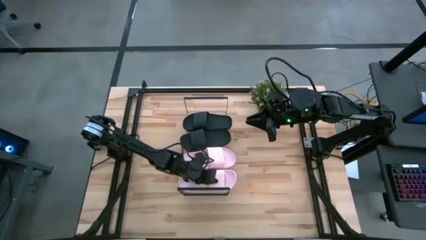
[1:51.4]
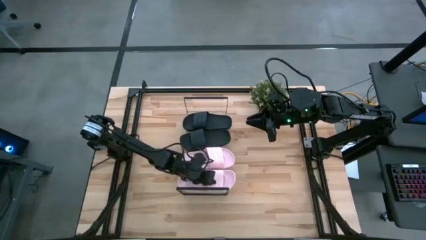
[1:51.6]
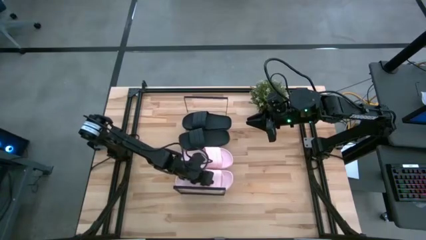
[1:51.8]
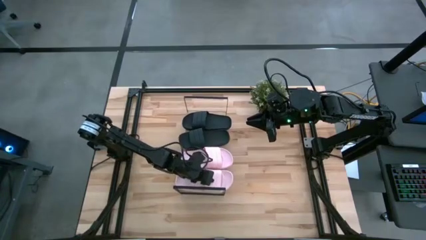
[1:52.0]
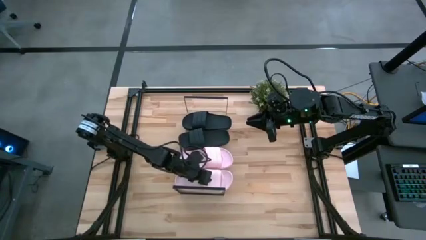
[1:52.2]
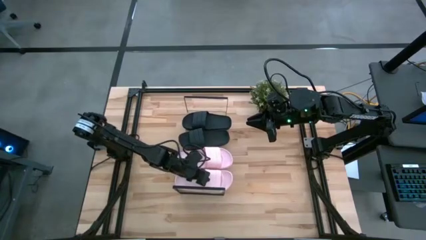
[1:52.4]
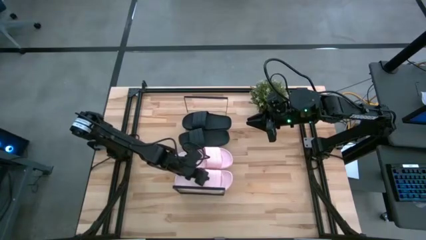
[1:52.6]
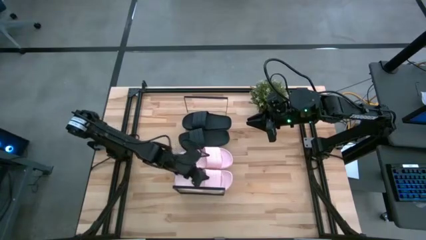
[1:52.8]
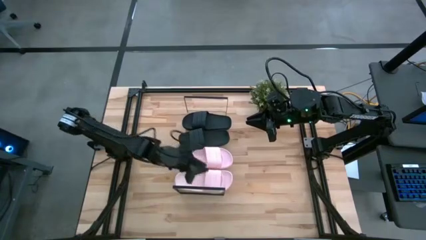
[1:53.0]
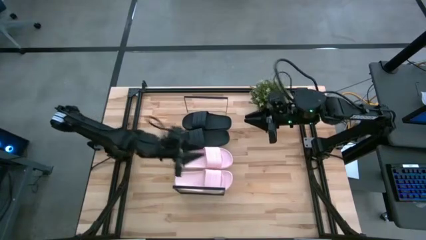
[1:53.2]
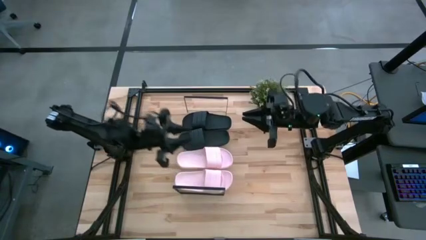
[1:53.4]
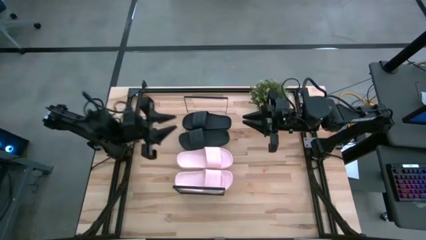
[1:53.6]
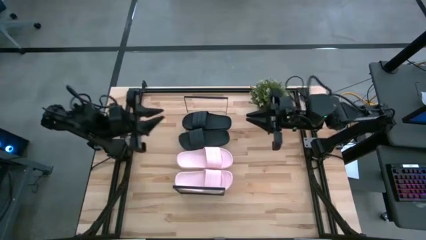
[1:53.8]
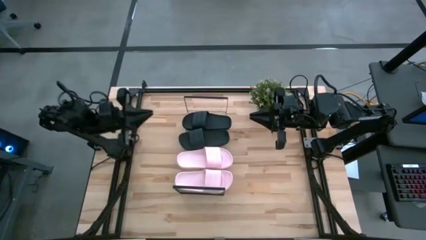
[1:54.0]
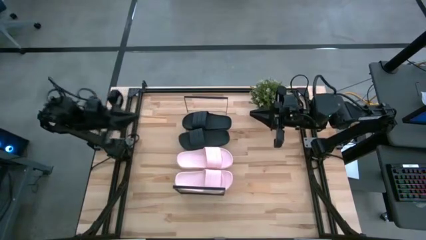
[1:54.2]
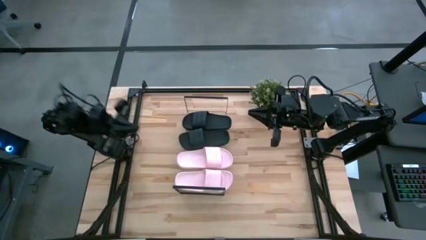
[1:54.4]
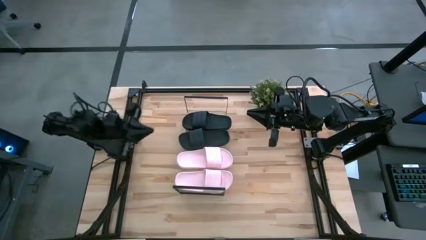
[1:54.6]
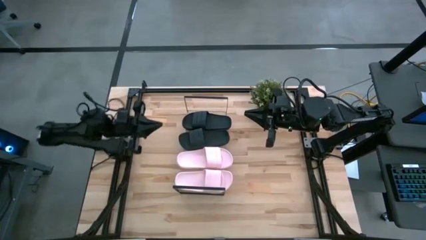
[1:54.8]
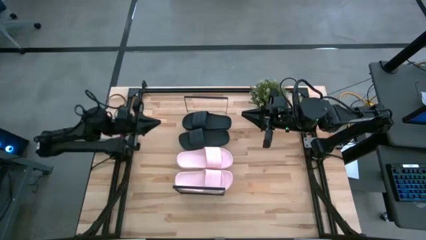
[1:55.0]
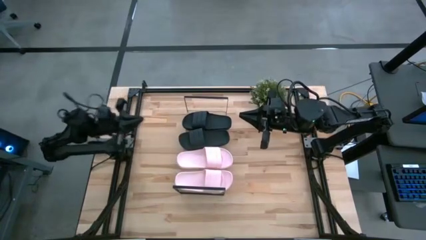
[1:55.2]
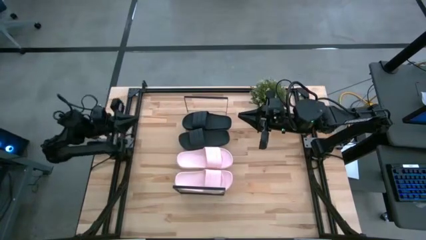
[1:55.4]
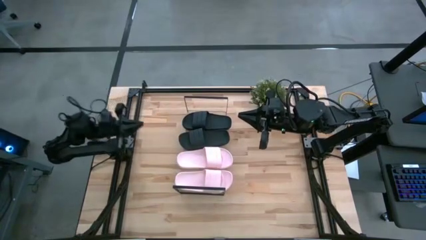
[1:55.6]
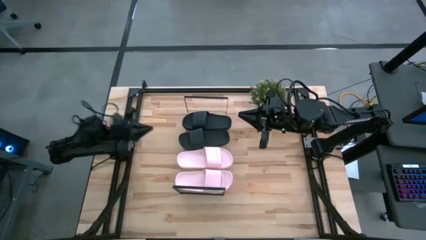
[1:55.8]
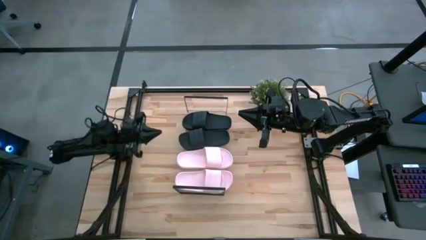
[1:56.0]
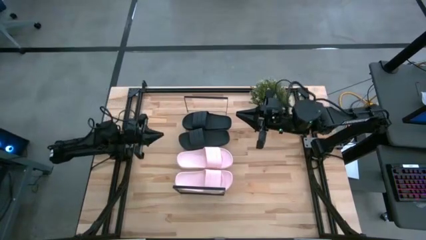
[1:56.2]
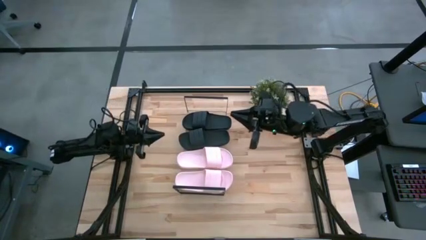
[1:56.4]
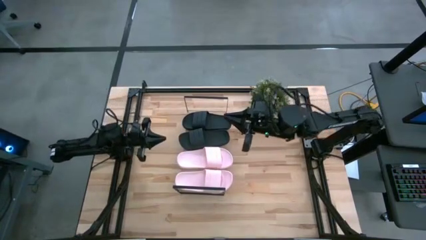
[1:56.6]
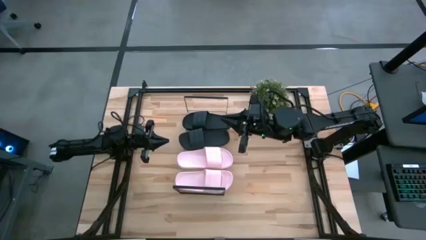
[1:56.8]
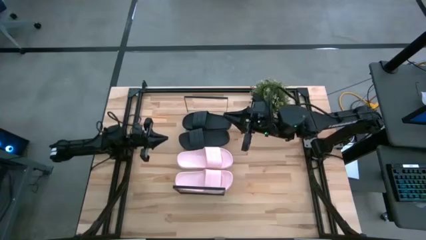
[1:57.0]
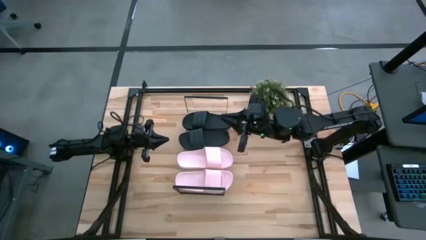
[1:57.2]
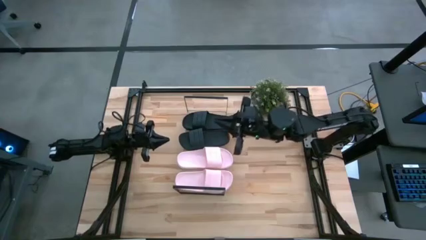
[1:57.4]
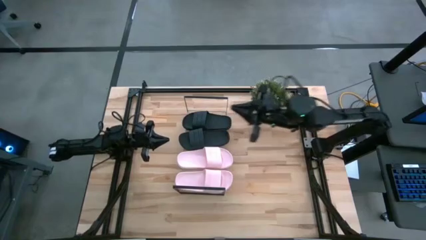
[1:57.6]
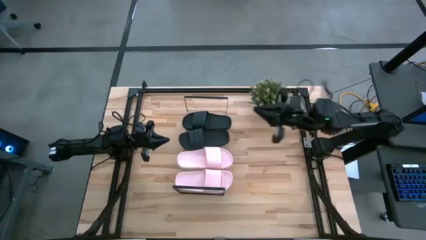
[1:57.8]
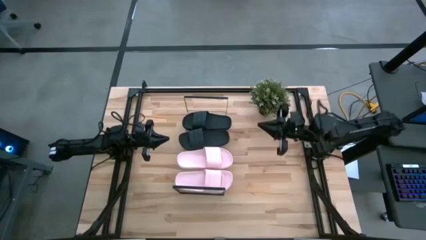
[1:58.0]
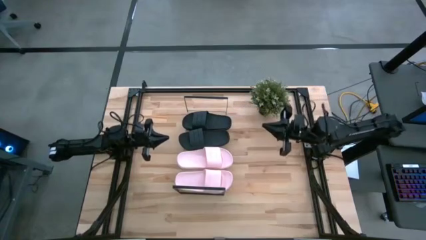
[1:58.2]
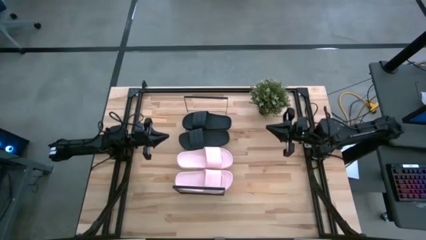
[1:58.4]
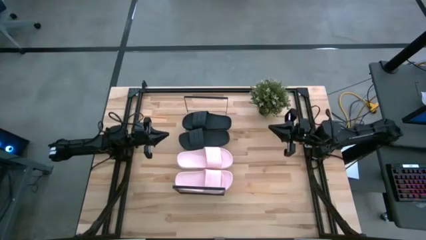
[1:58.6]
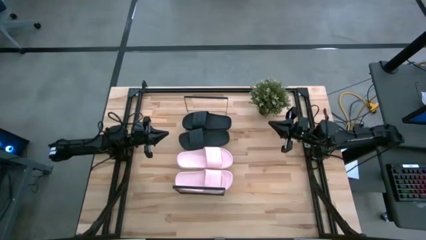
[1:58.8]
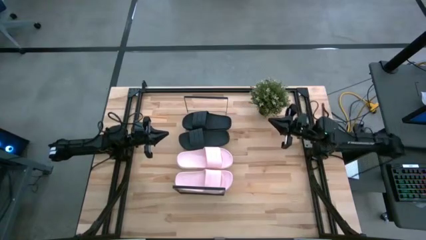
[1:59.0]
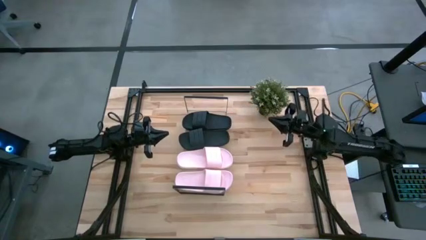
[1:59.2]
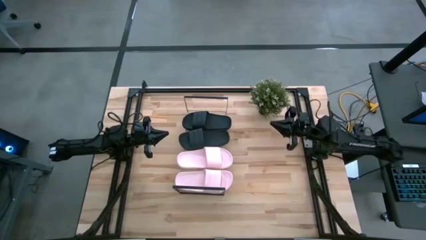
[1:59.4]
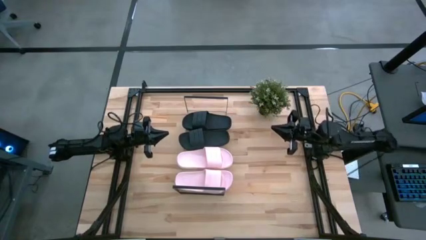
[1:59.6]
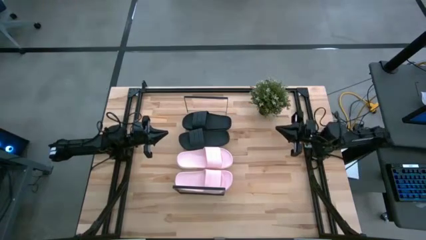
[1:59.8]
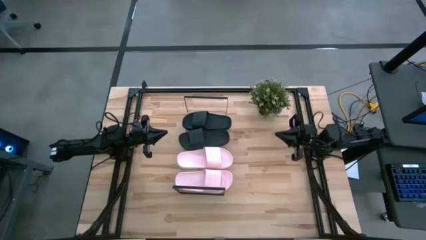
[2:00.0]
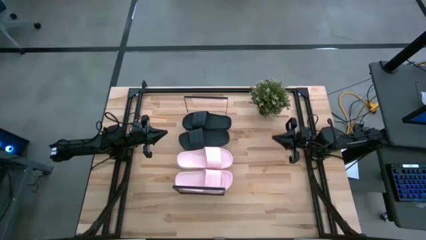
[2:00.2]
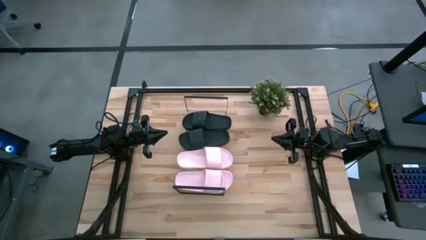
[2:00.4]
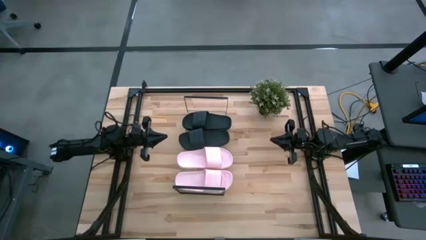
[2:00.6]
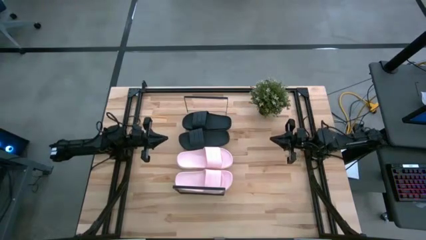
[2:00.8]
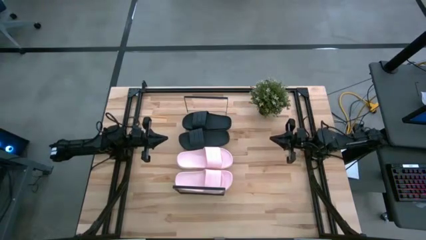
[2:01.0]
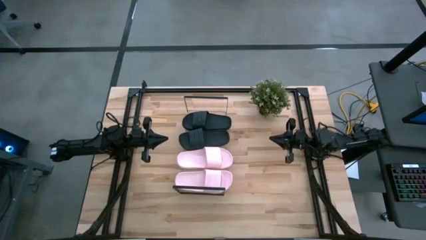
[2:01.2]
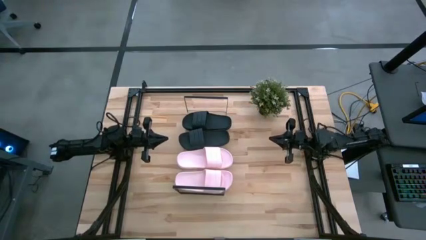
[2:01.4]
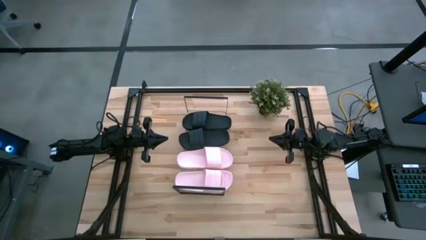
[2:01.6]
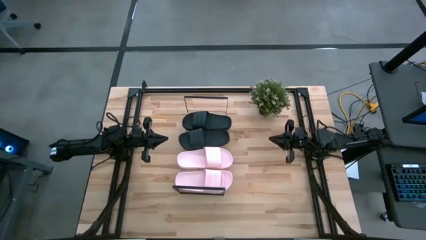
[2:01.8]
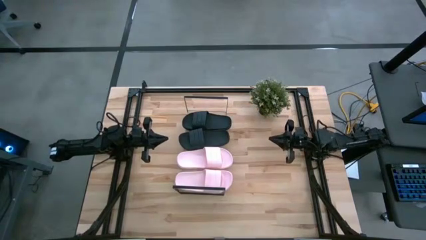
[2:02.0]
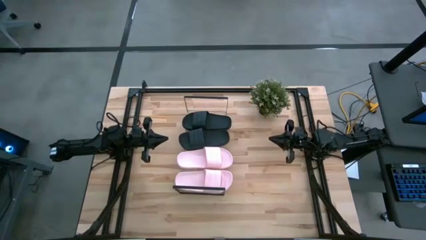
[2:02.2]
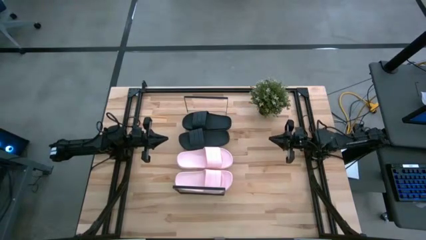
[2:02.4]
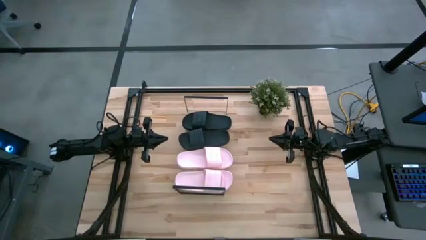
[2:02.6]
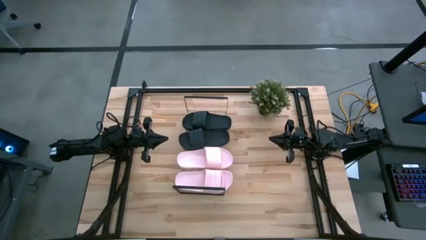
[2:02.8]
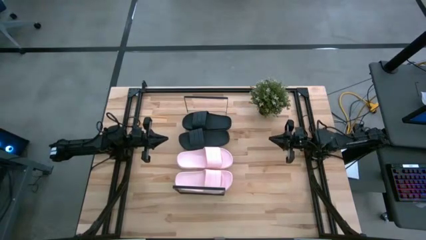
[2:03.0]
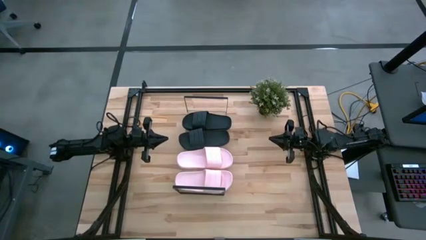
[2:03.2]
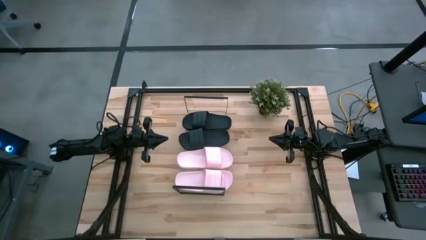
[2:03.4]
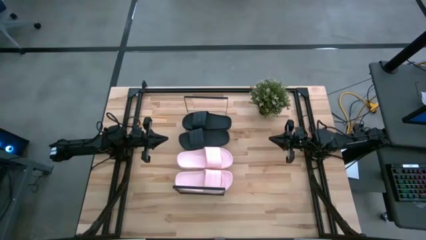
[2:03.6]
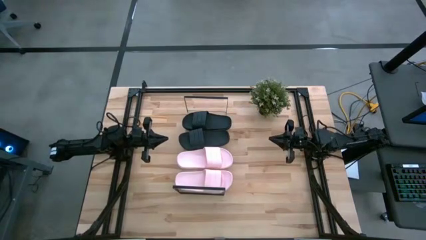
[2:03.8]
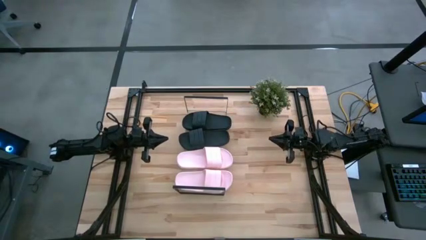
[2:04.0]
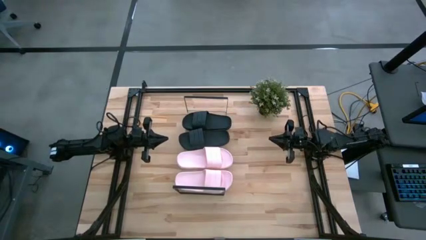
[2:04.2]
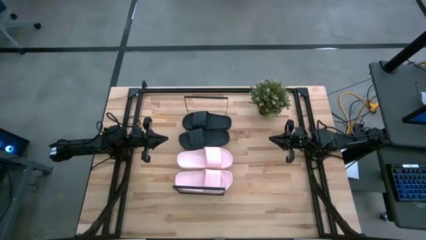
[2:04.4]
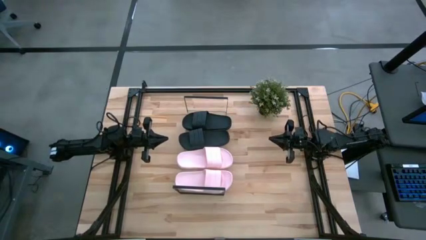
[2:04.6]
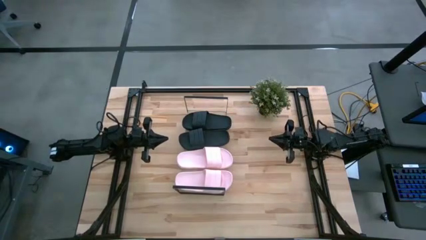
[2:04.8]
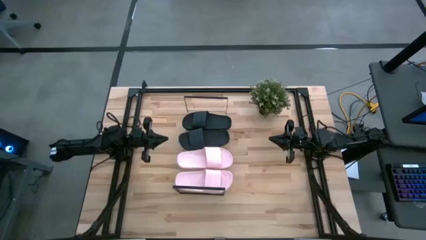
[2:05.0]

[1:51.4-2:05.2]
Task: Pick and place slides into the shelf
Return to Home Position
